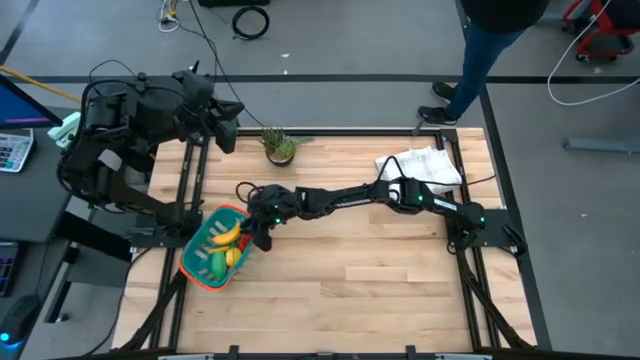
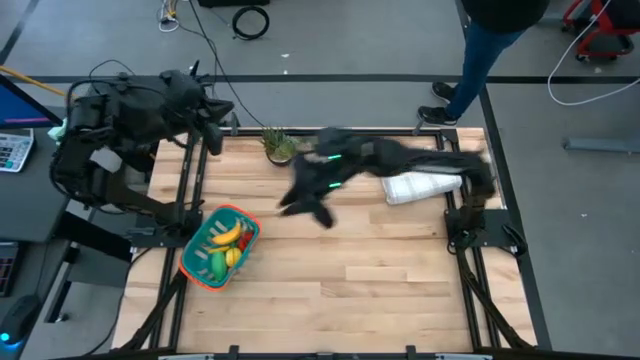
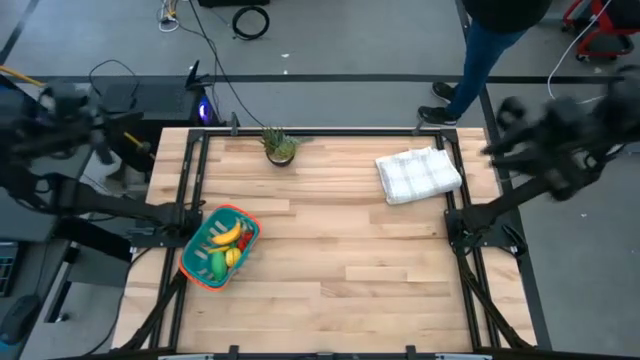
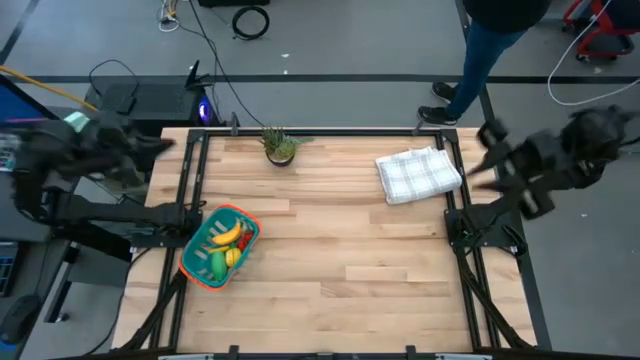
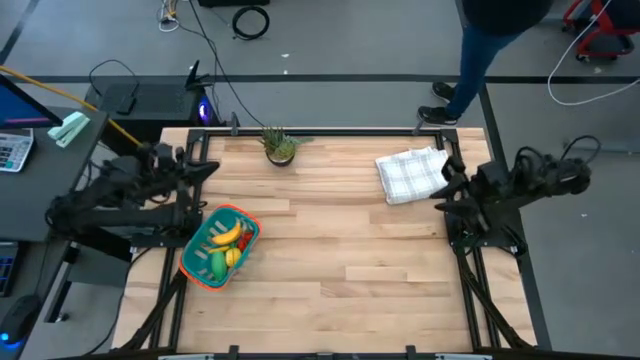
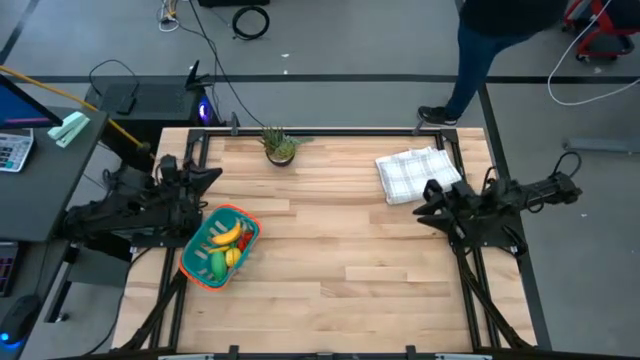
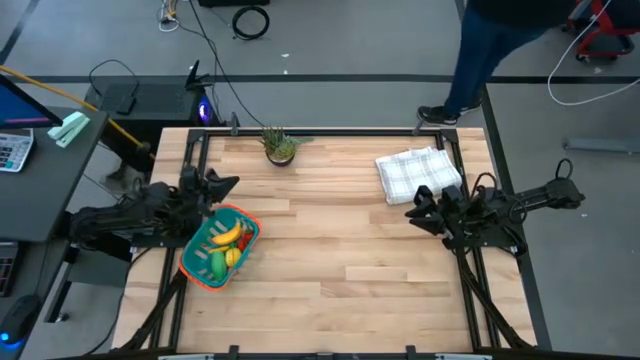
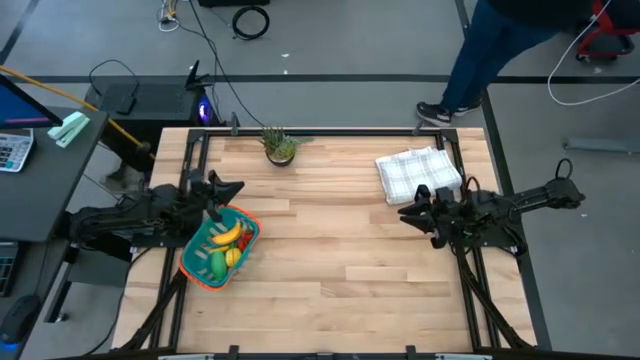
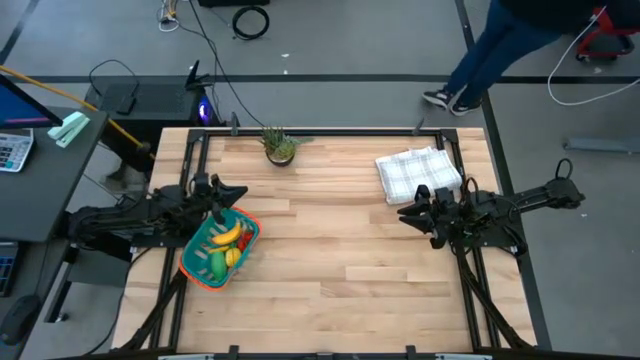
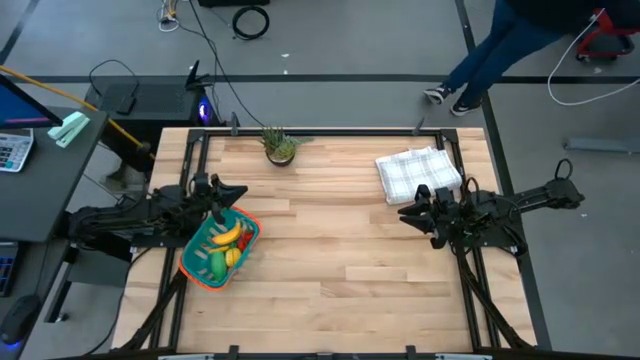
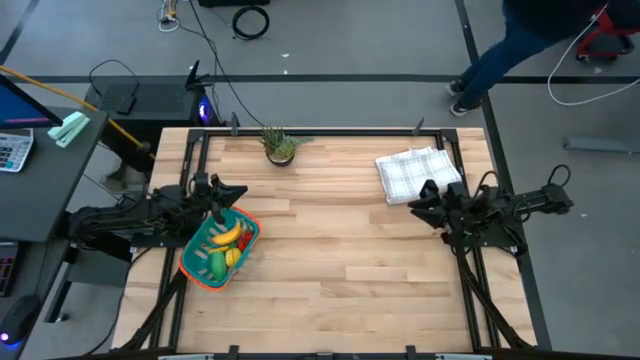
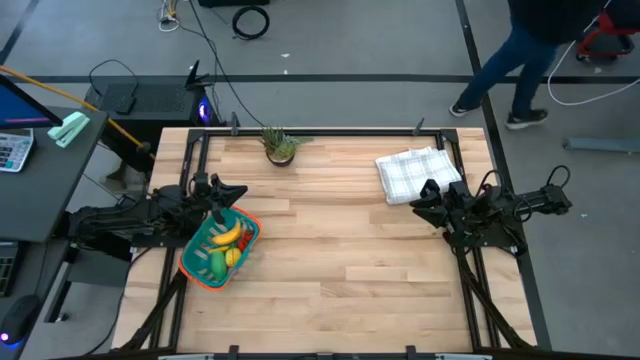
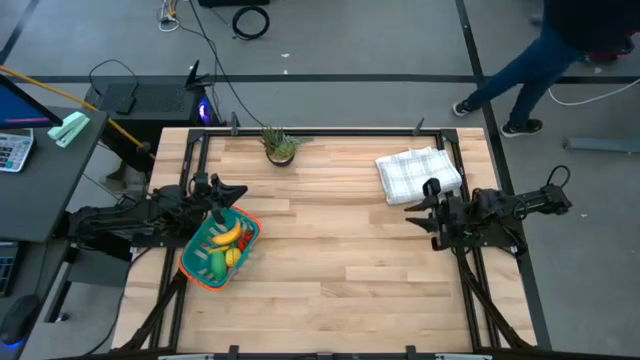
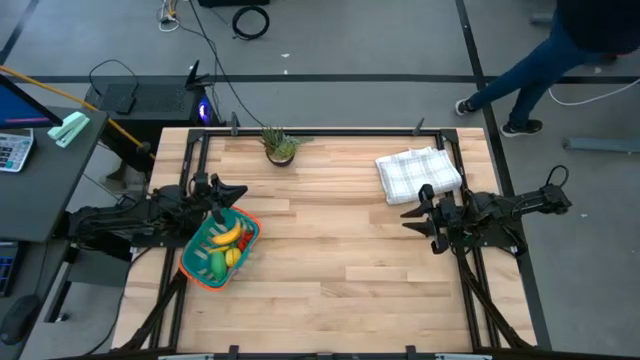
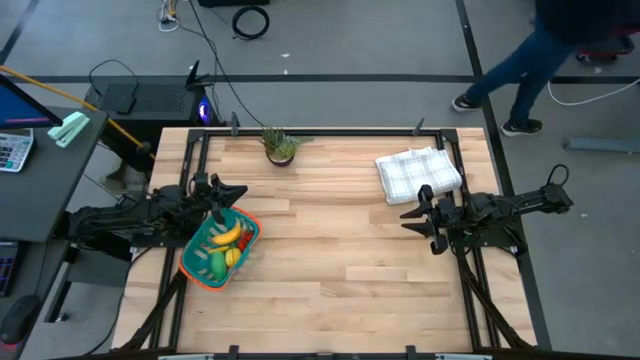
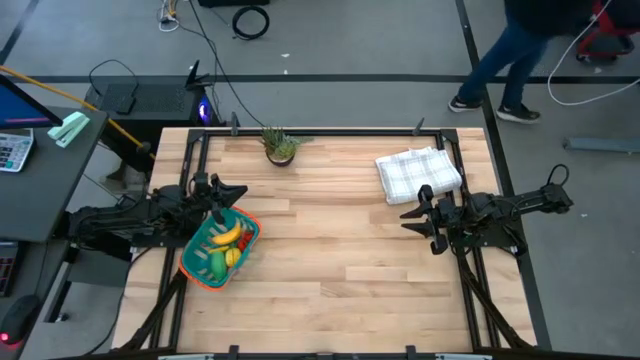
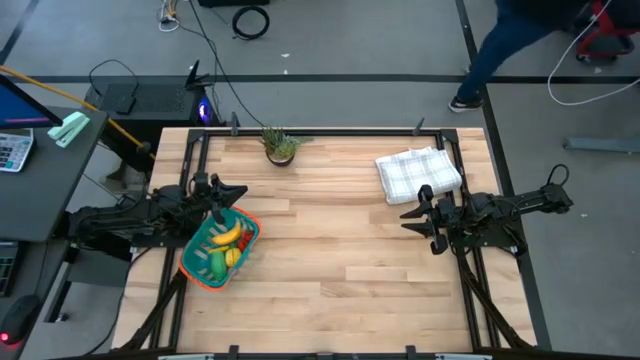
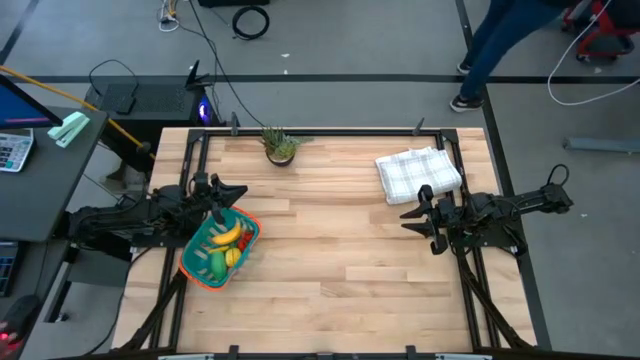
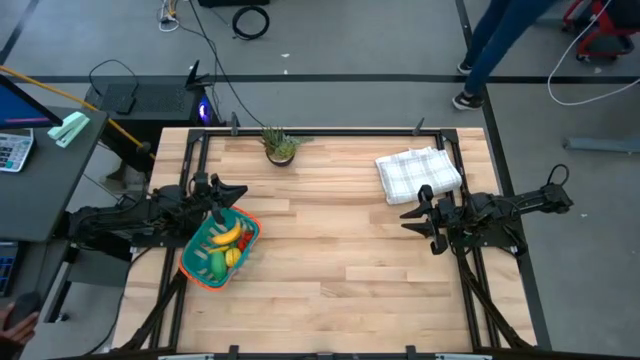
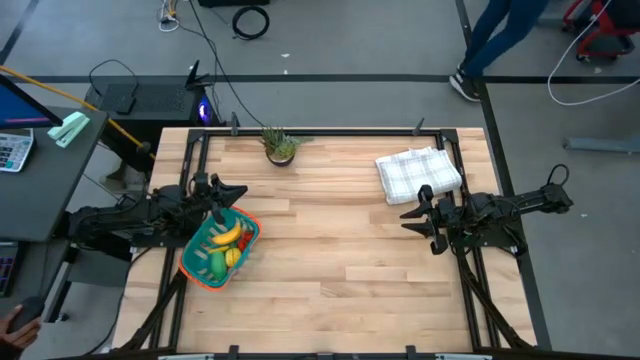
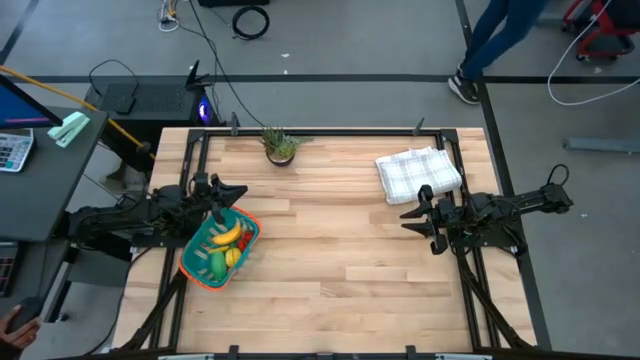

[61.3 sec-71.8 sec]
Task: Pick and placing Produce into tupperware
Return to Home Position

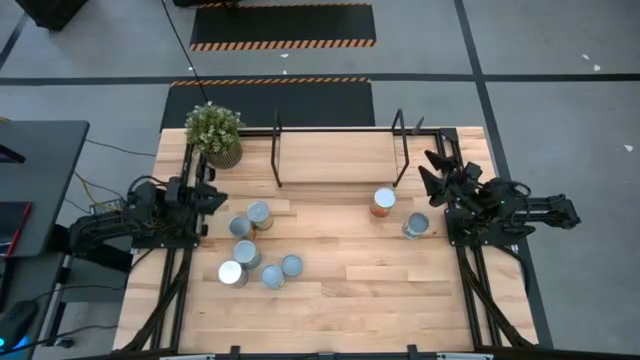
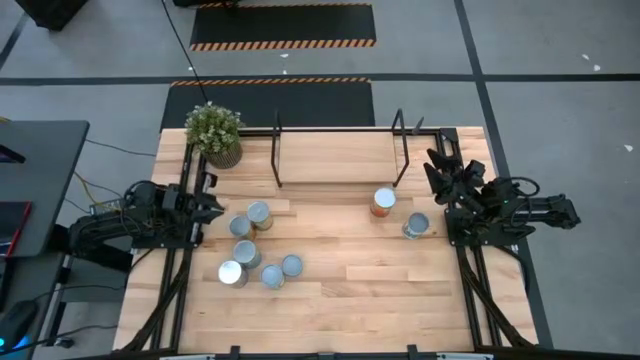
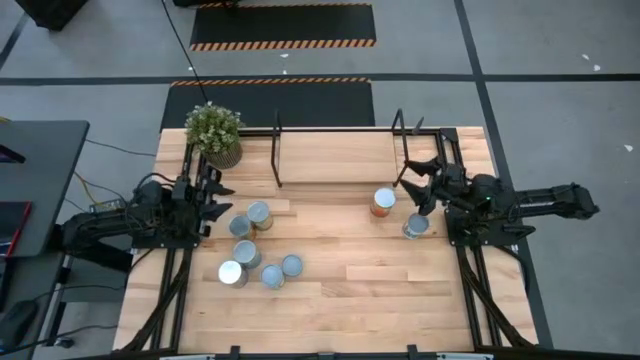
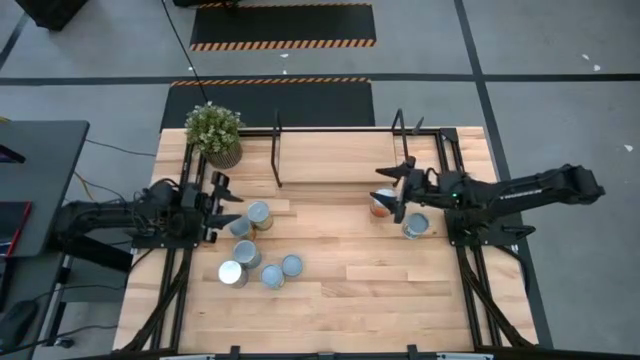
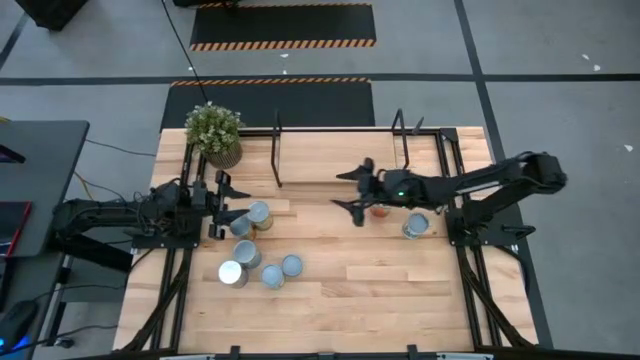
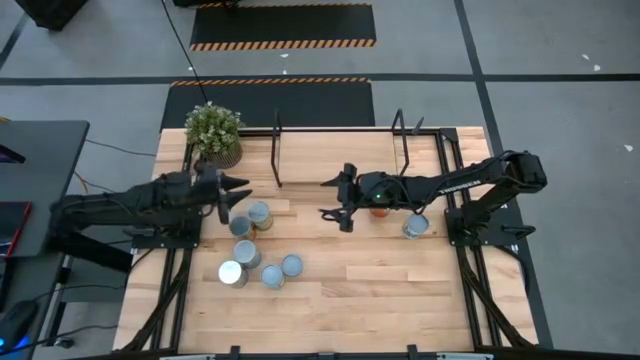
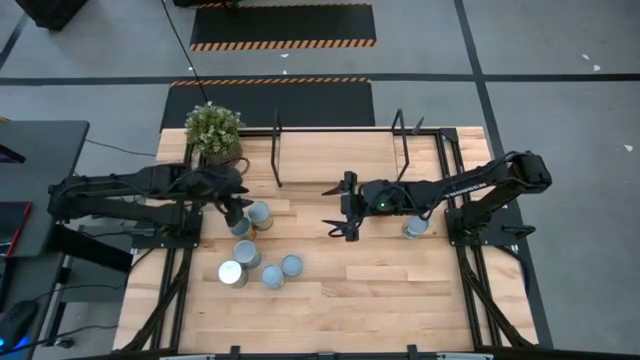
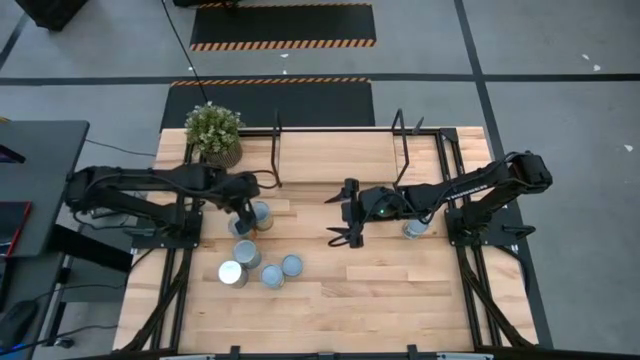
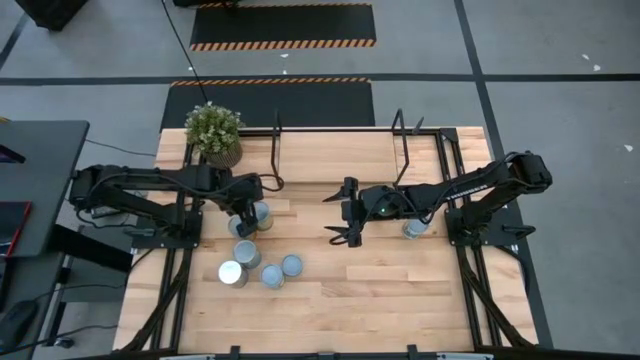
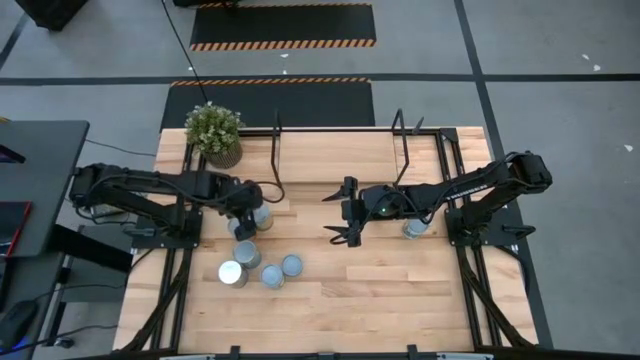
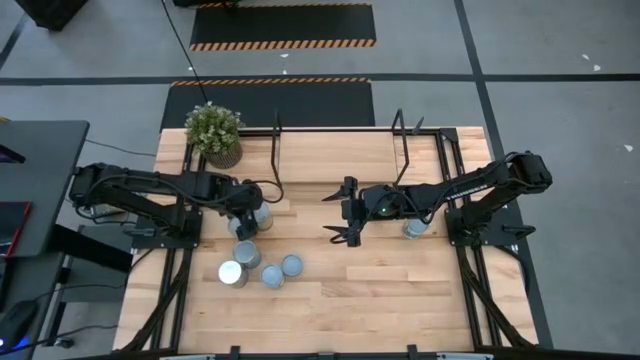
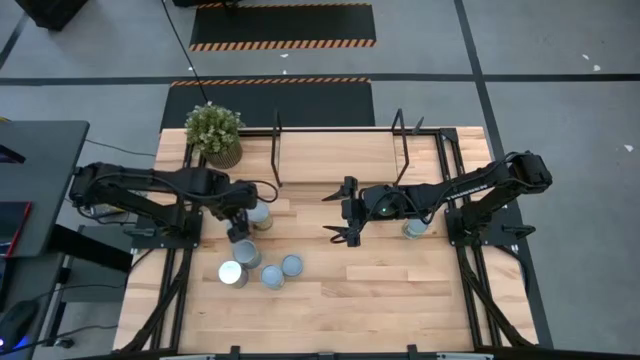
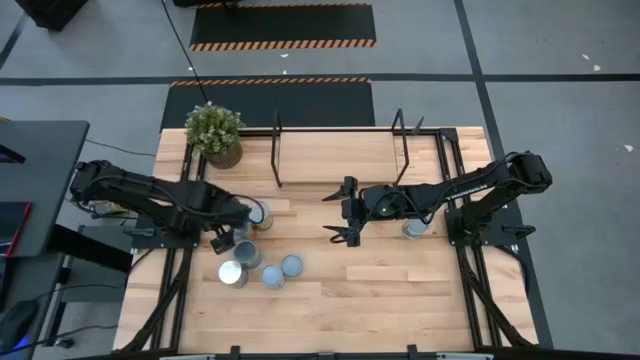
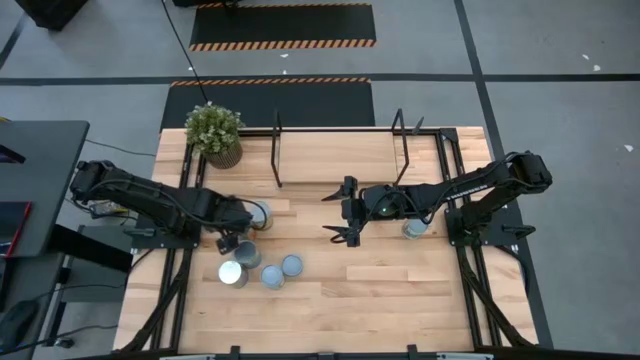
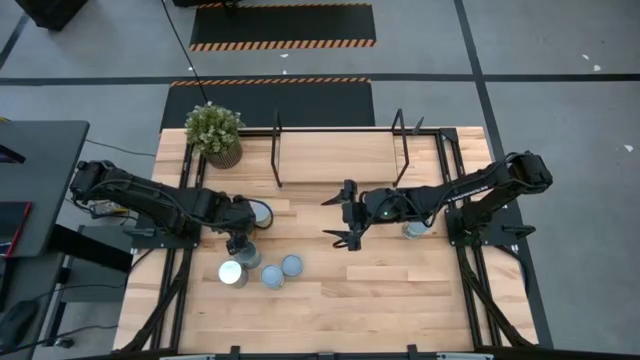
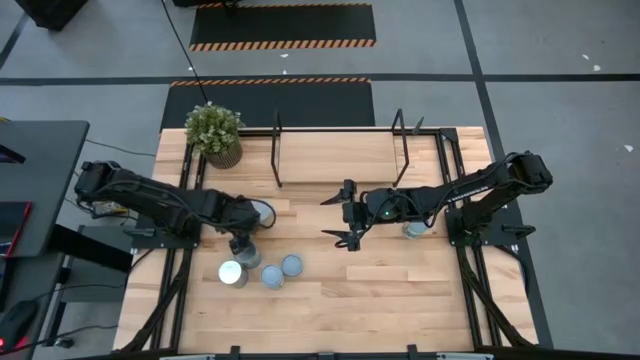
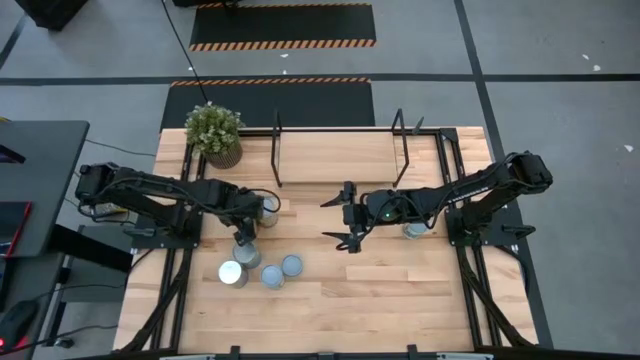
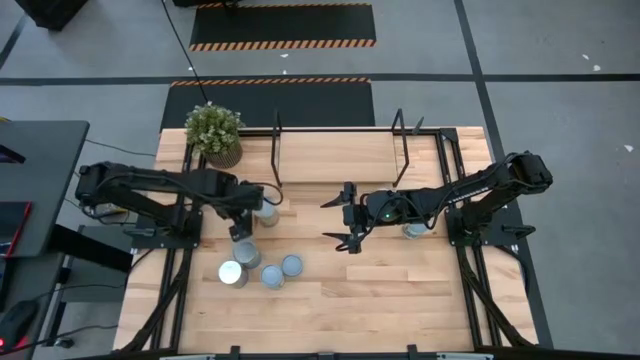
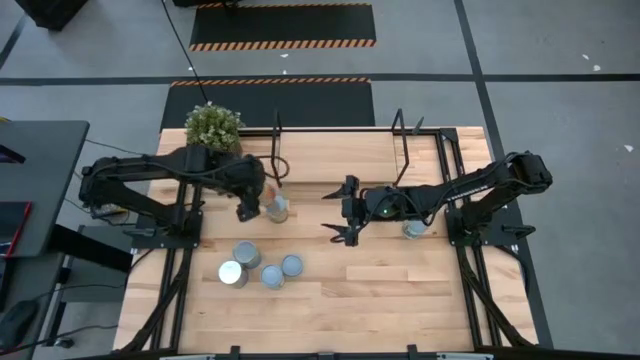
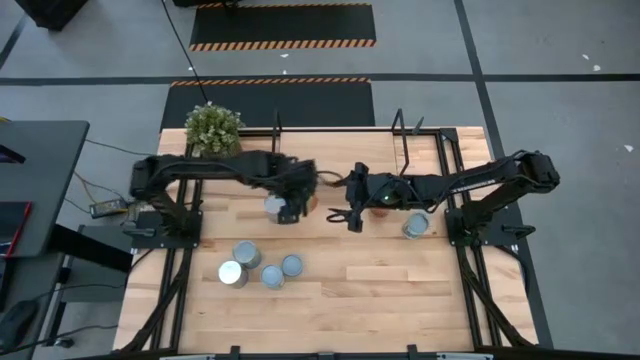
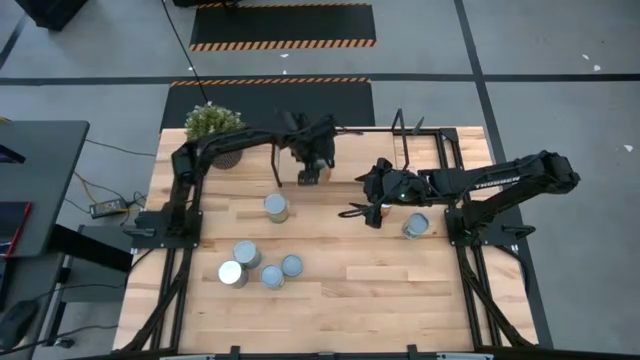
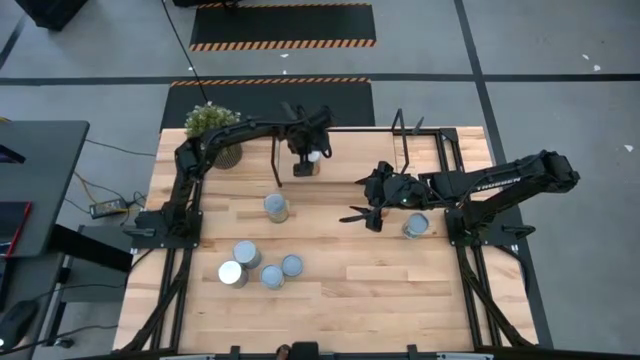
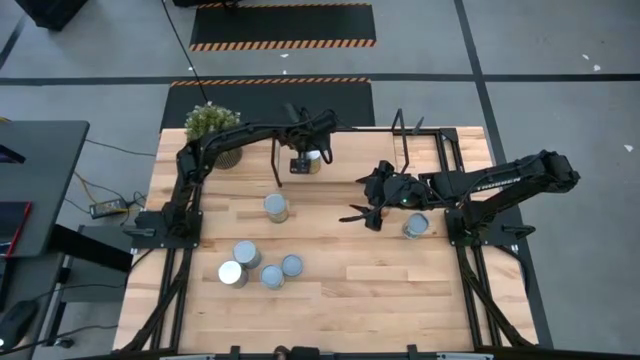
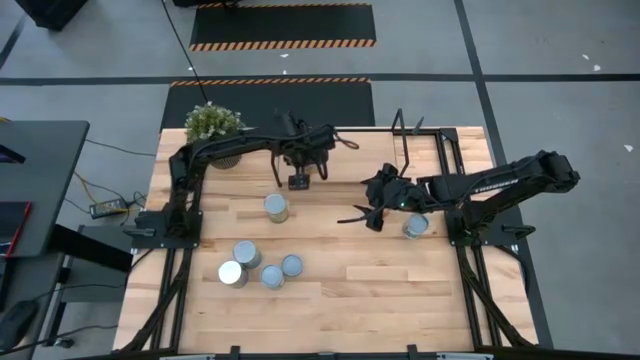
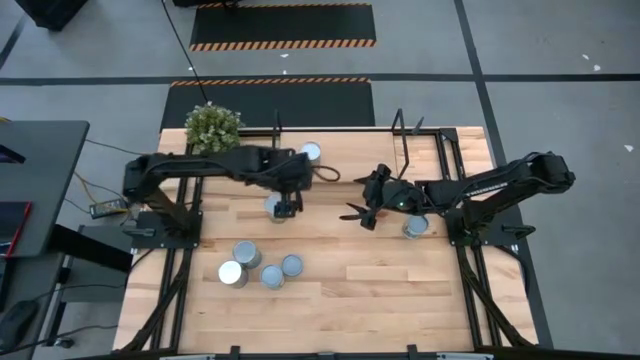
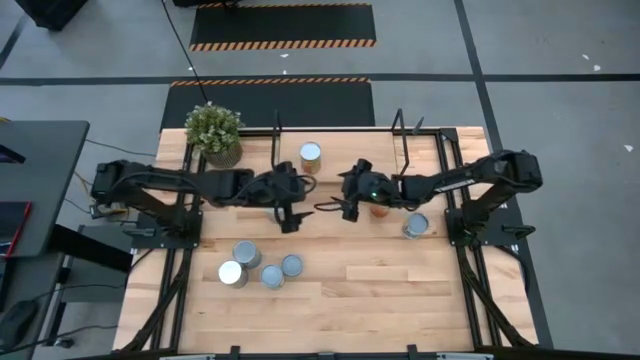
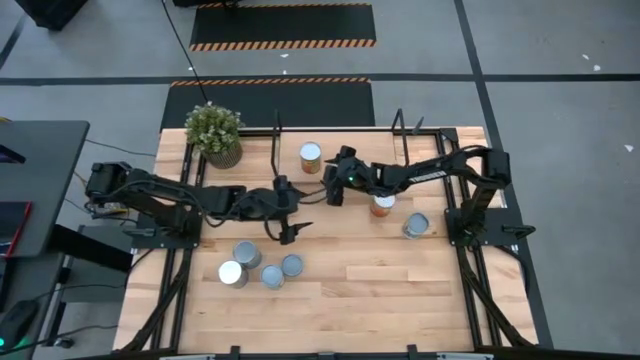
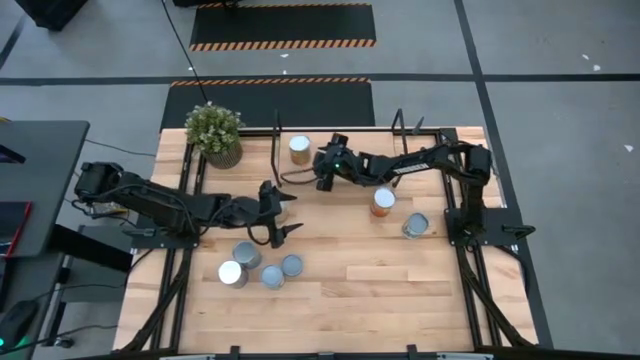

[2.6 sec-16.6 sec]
Task: Pick and place cans onto a shelf
Put the canned pineapple on the shelf
